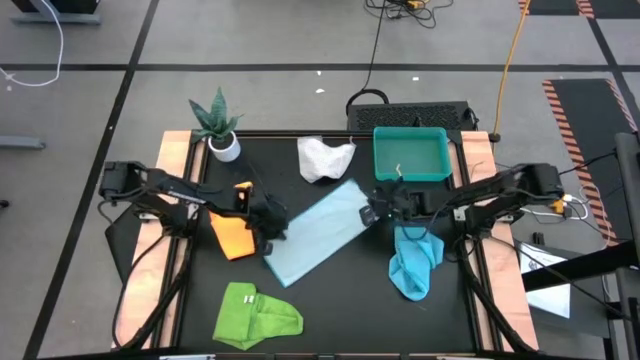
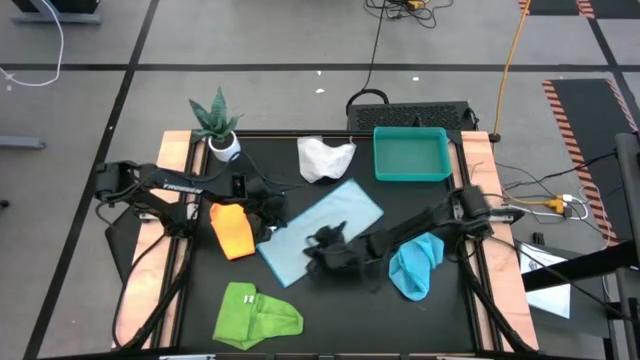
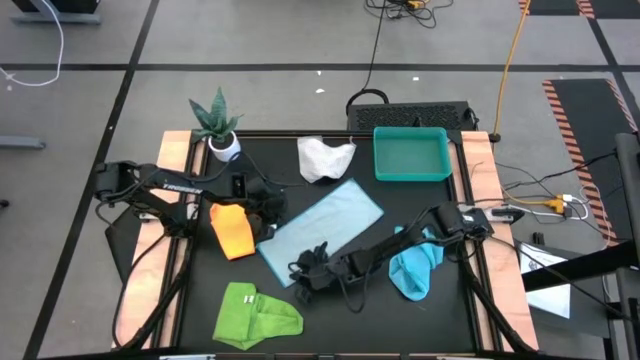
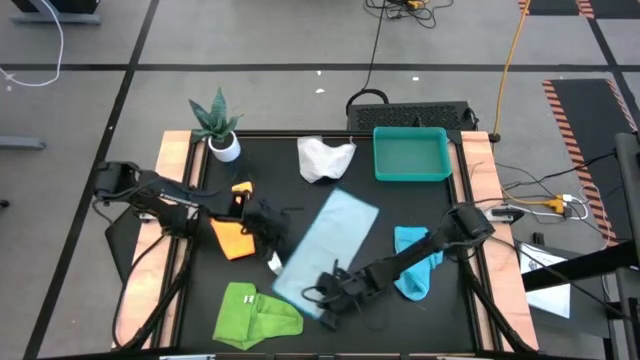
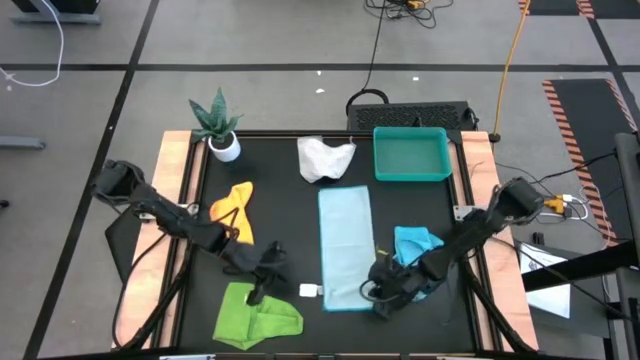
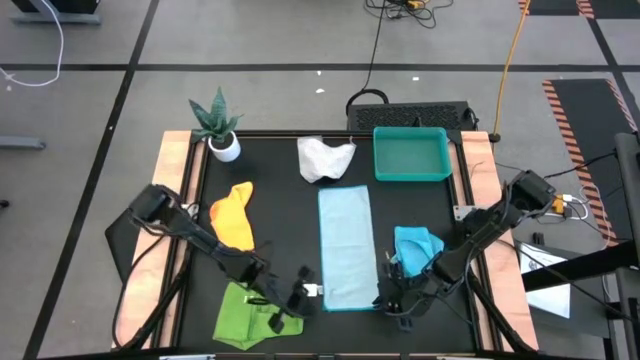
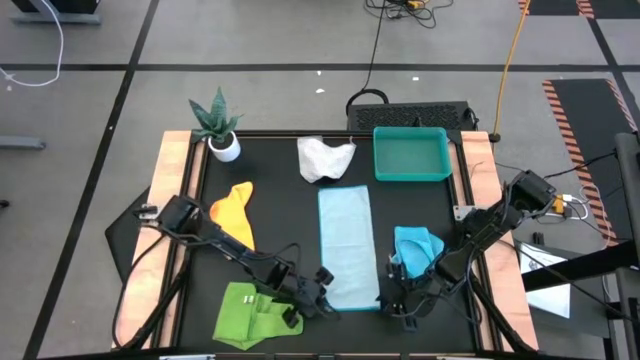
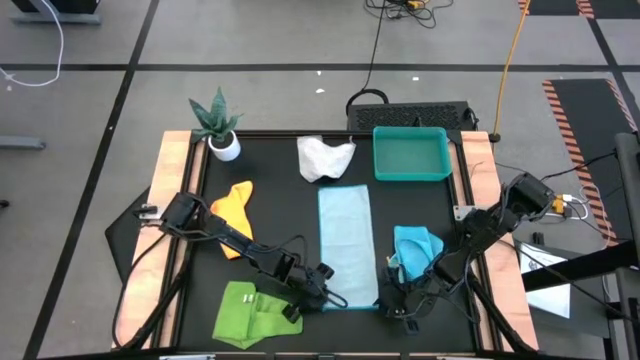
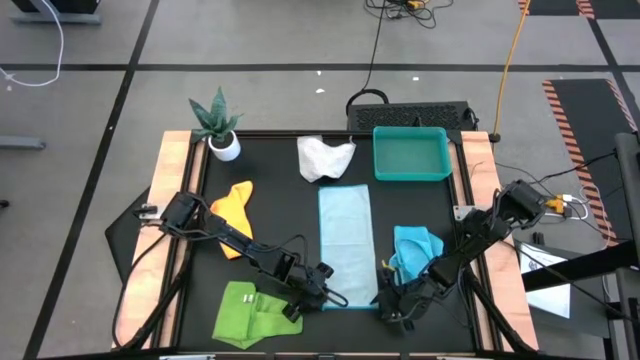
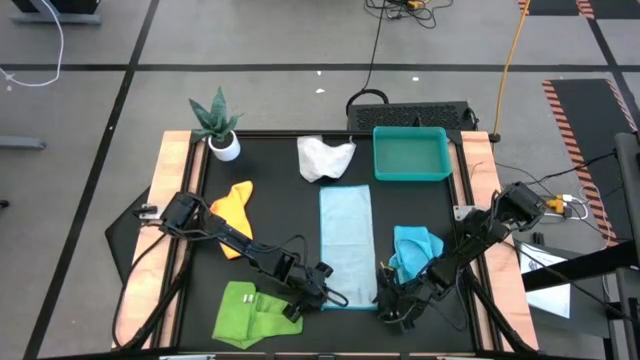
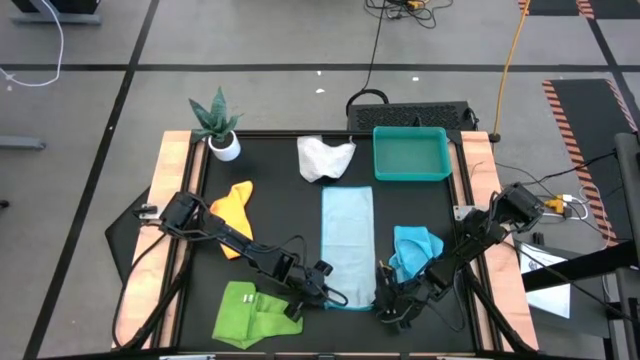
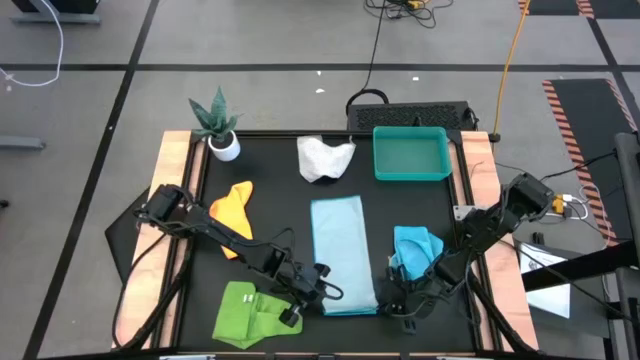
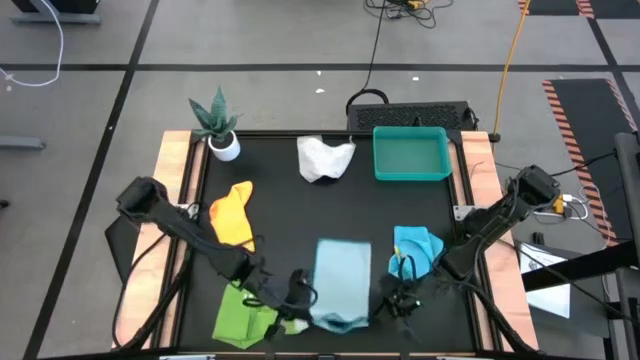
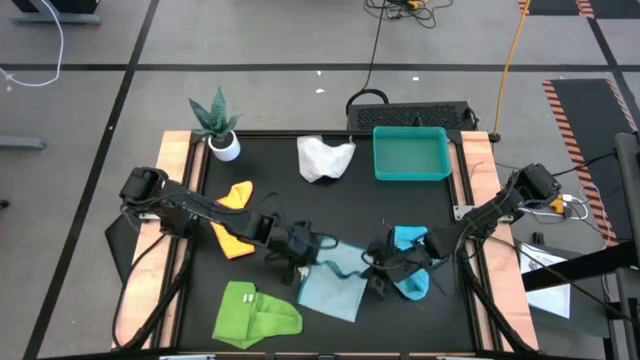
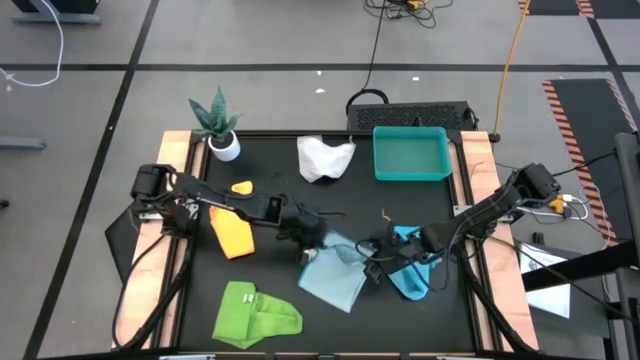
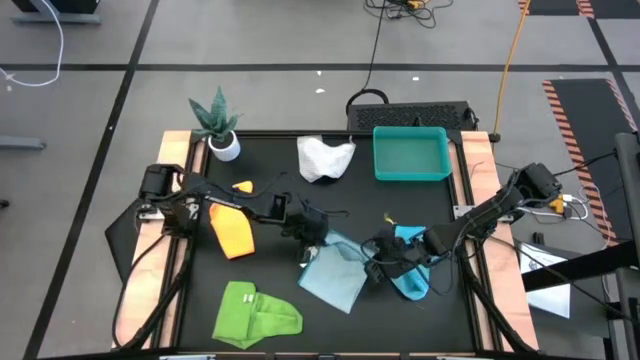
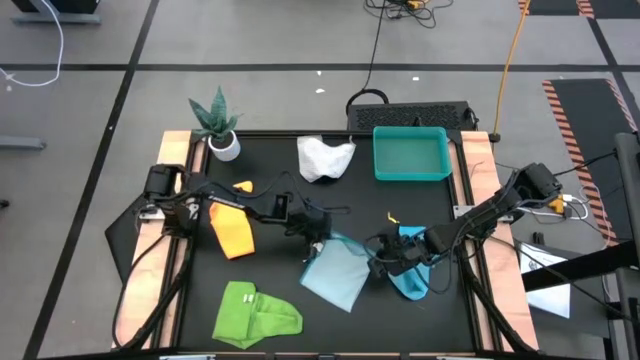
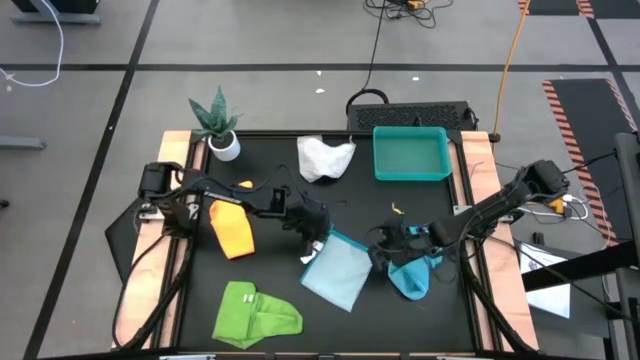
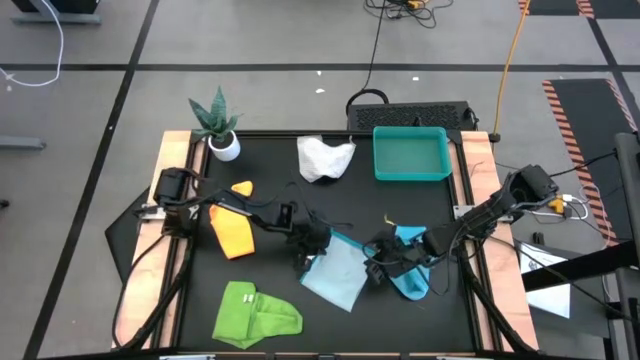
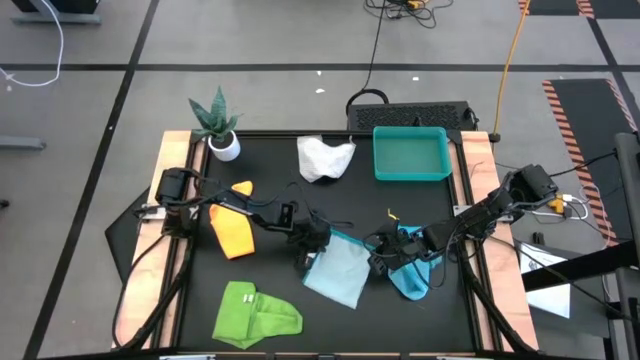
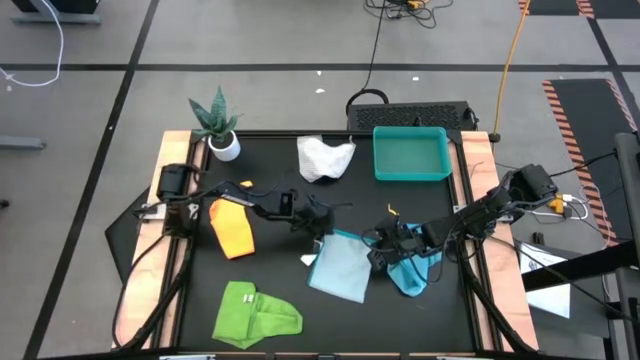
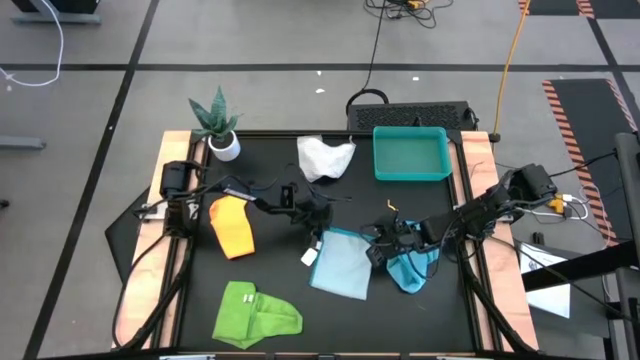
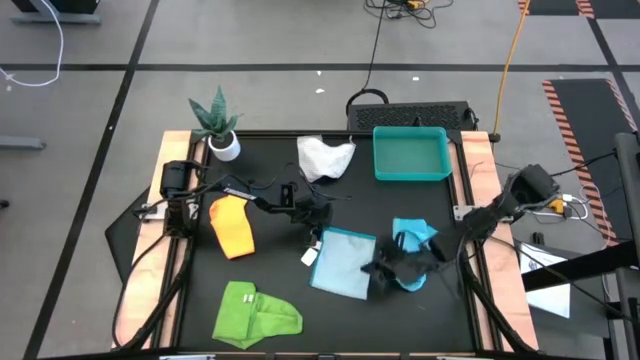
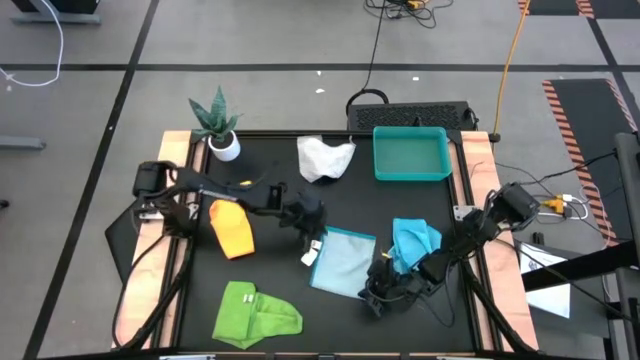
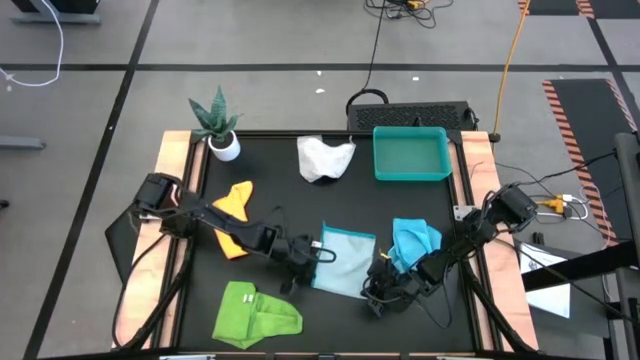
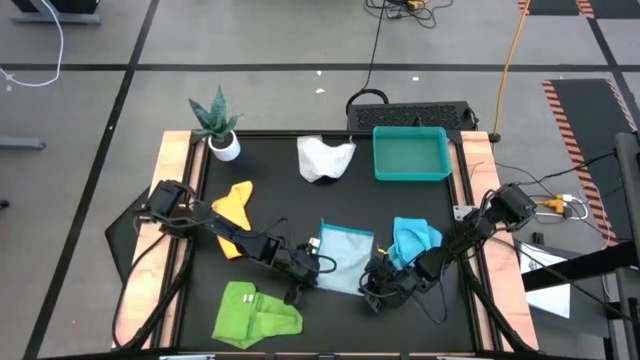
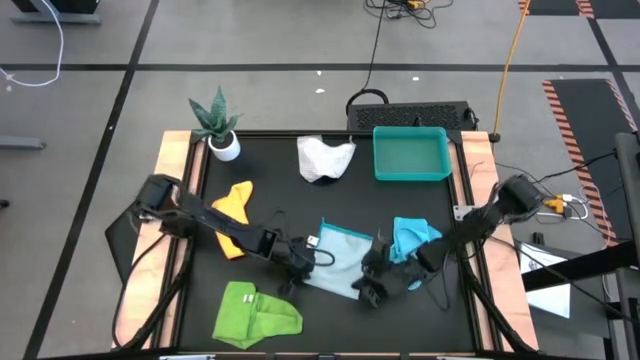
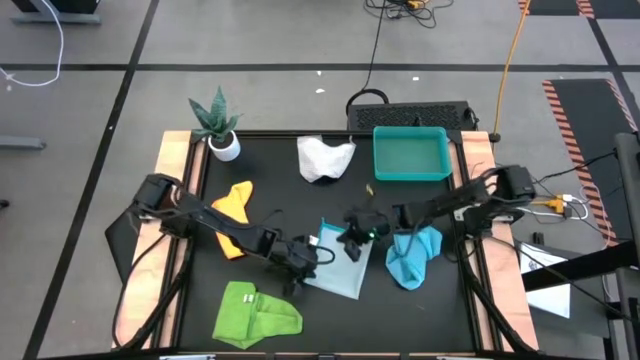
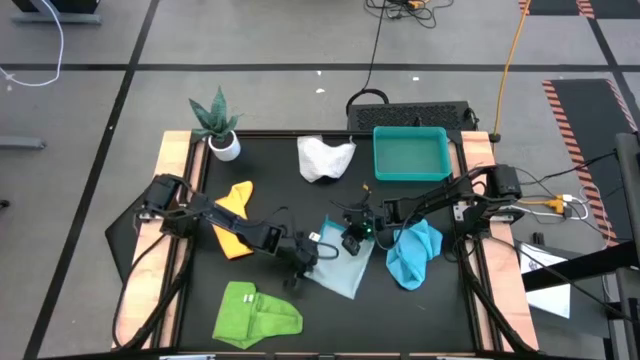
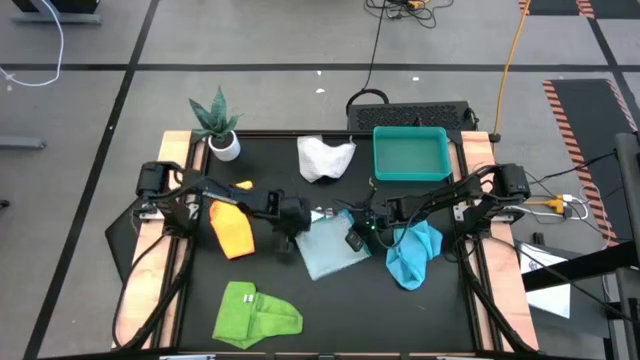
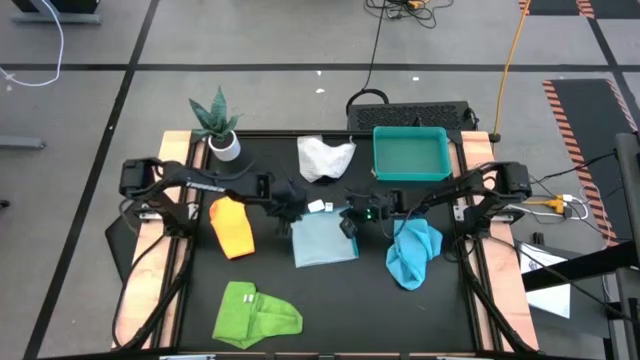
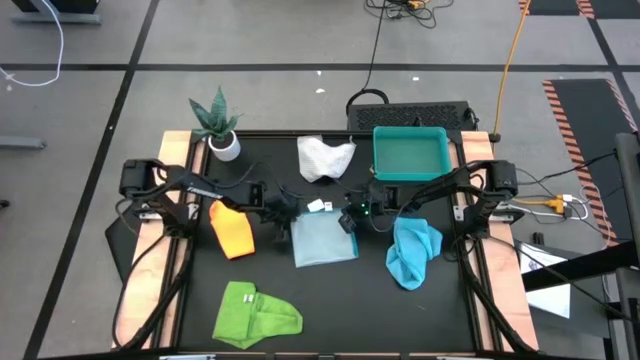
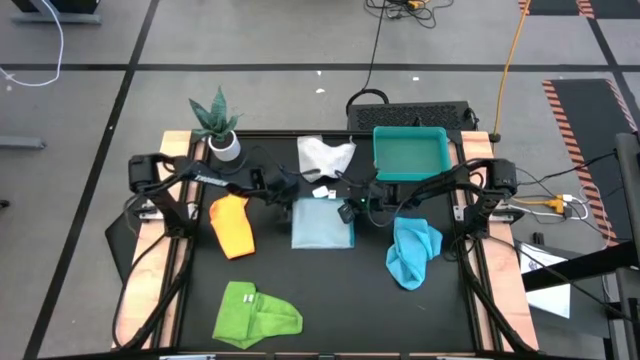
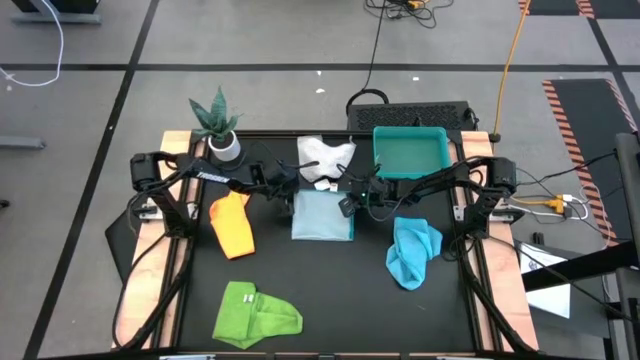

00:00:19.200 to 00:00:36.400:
Task: Fold microfiber towels
Fold the blue microfiber towel

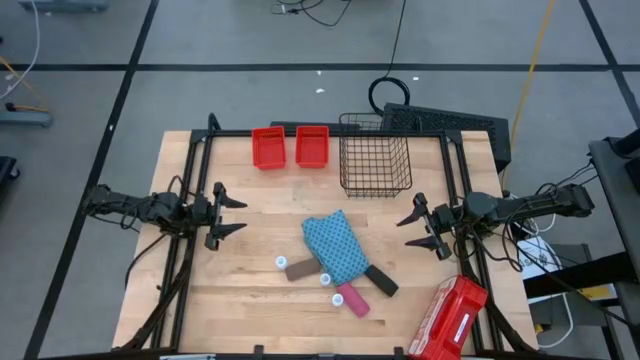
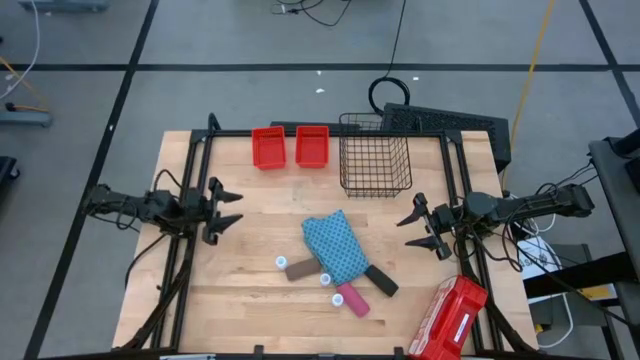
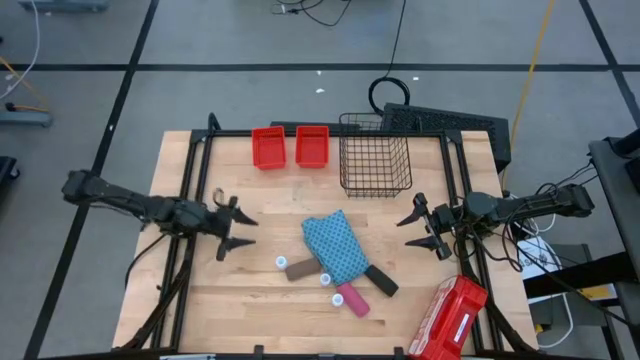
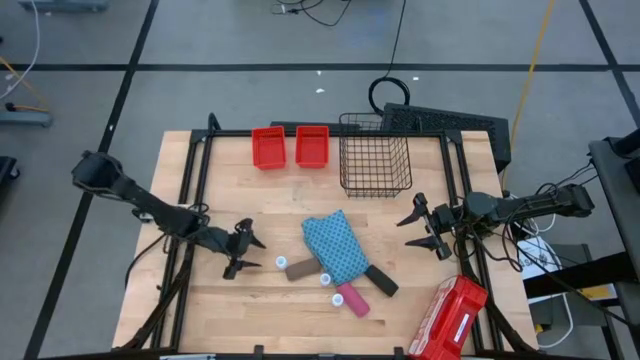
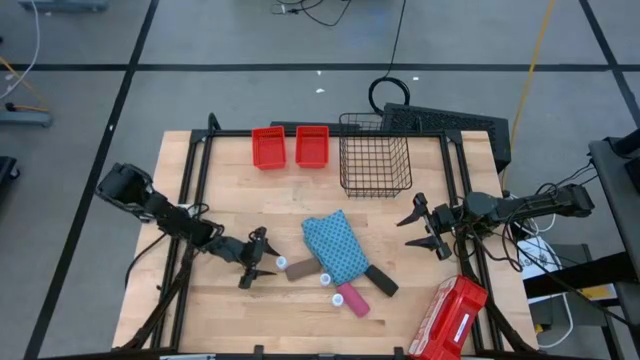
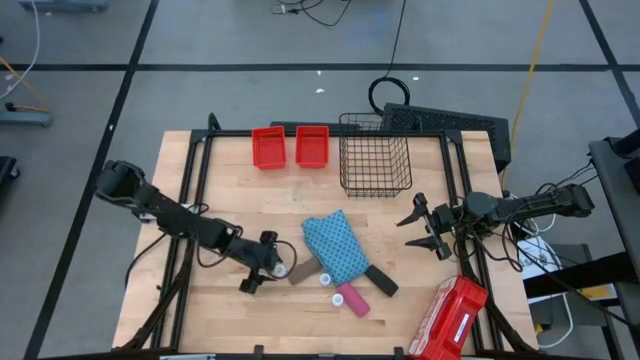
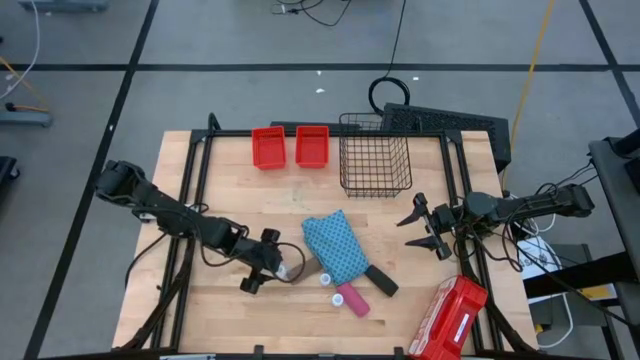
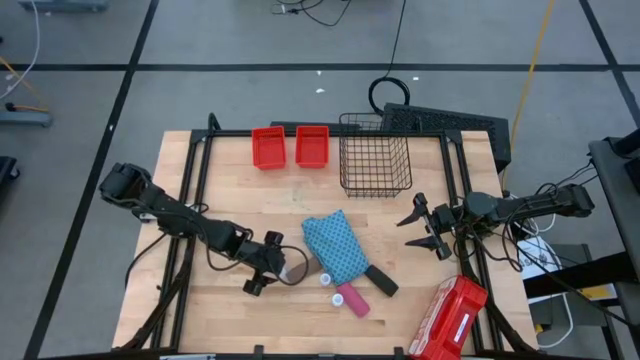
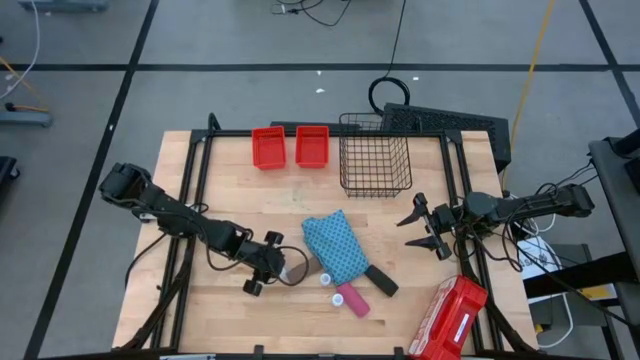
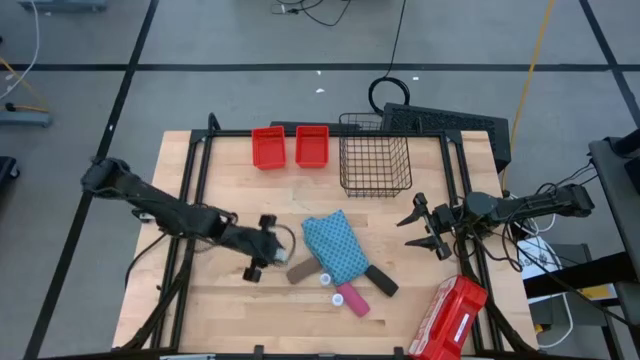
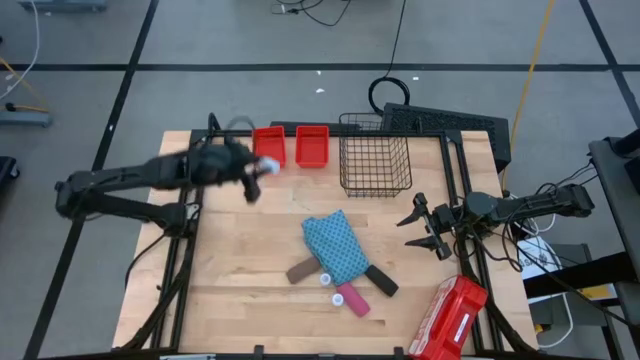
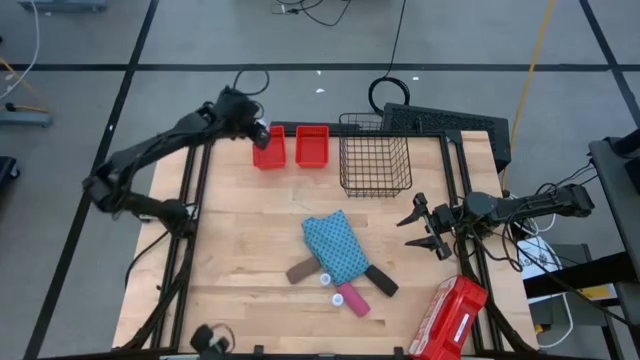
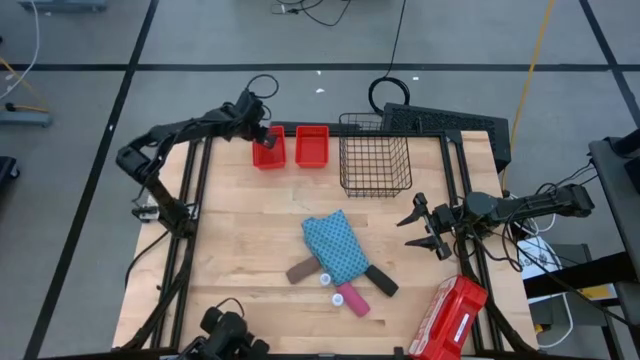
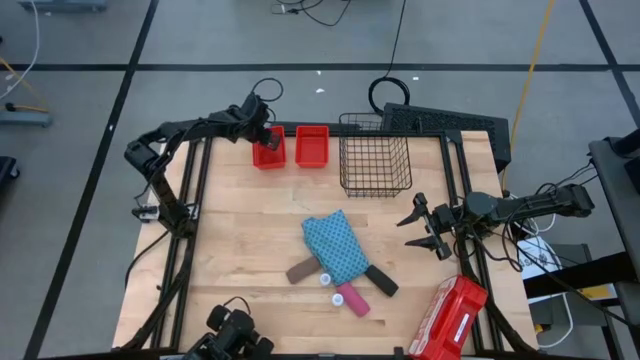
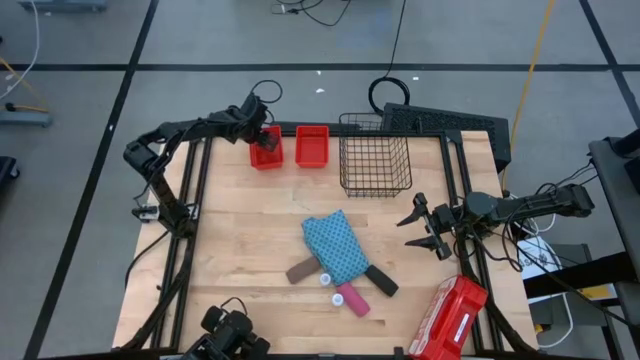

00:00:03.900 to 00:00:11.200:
Task: Pick & Place Medicine items
Put the top white pill bottle into the left orange basket
